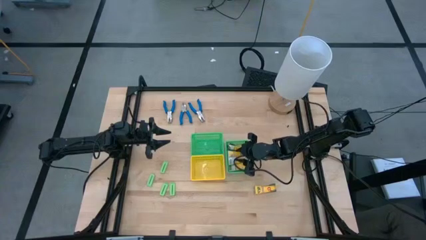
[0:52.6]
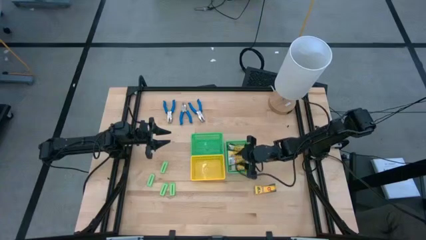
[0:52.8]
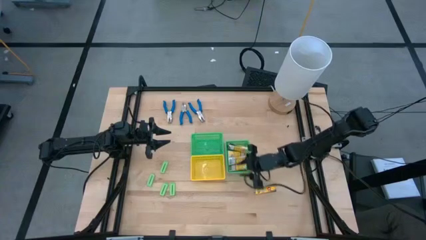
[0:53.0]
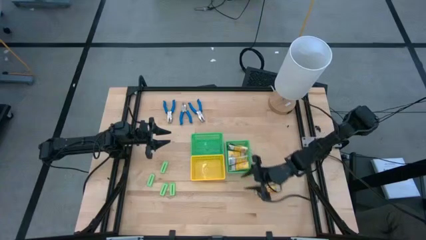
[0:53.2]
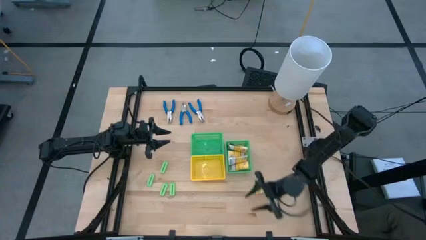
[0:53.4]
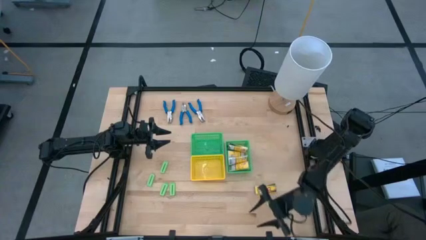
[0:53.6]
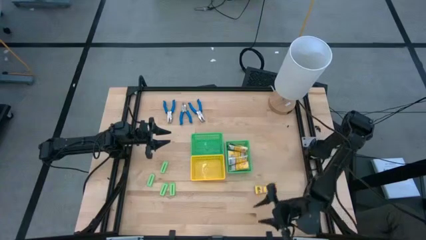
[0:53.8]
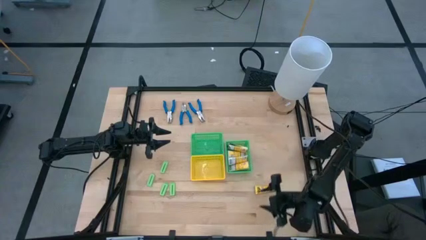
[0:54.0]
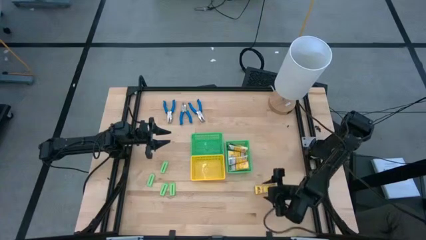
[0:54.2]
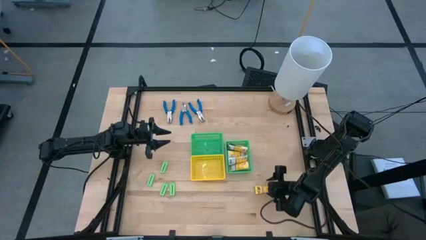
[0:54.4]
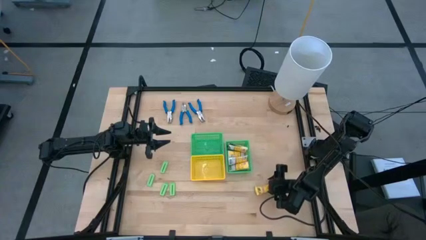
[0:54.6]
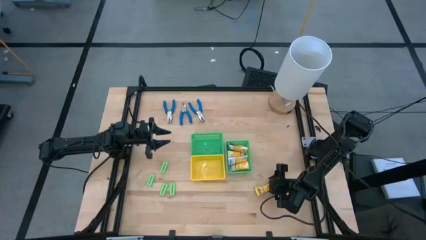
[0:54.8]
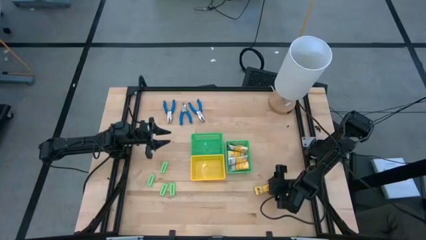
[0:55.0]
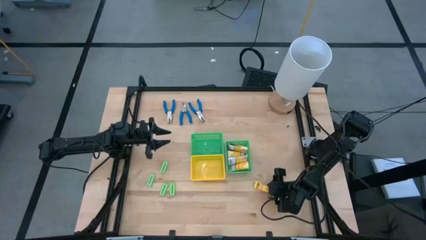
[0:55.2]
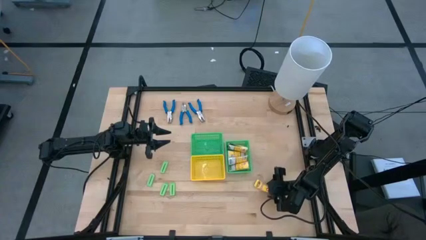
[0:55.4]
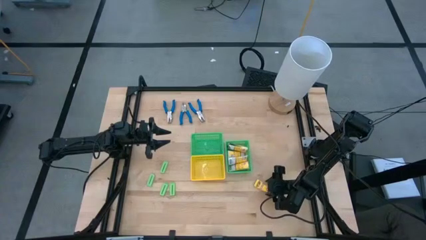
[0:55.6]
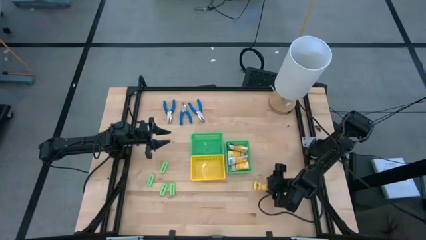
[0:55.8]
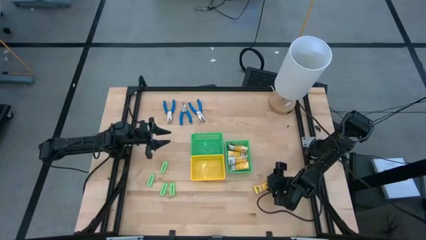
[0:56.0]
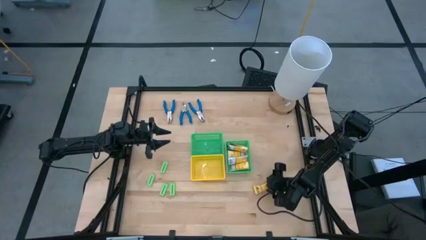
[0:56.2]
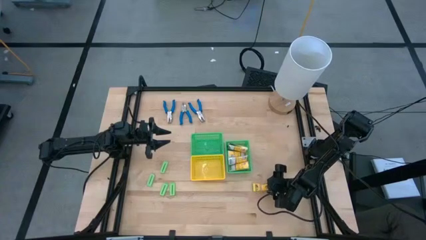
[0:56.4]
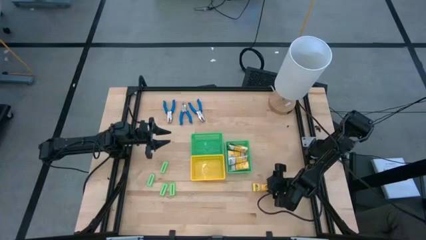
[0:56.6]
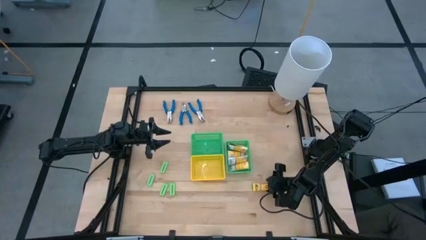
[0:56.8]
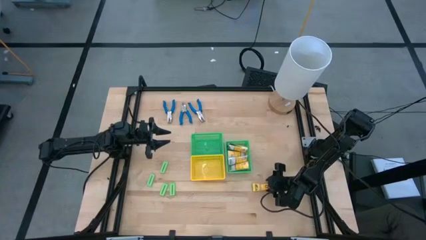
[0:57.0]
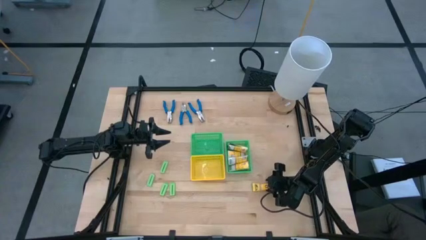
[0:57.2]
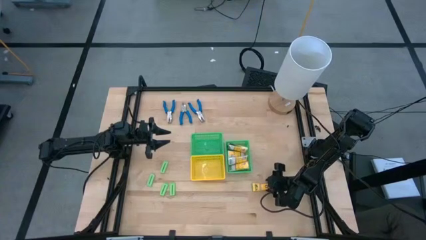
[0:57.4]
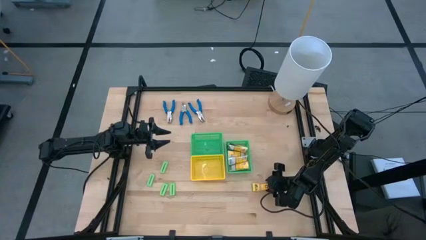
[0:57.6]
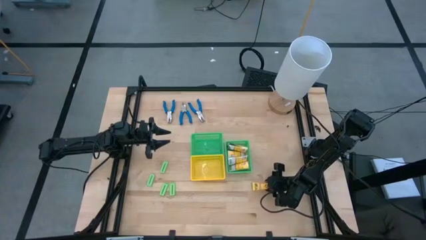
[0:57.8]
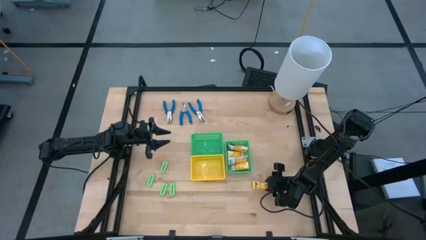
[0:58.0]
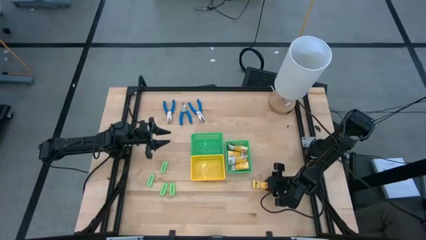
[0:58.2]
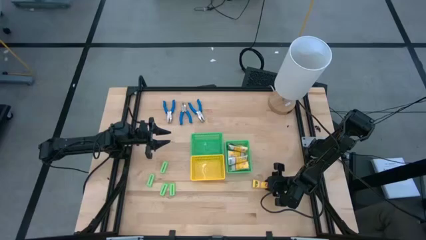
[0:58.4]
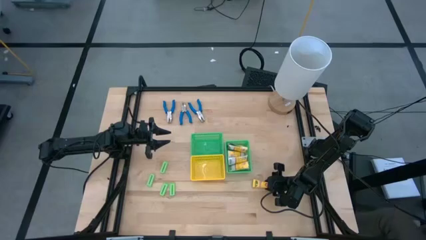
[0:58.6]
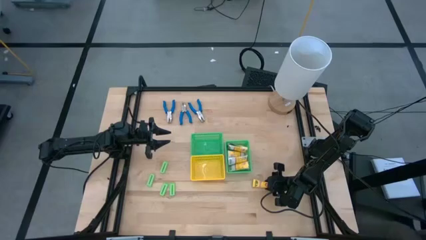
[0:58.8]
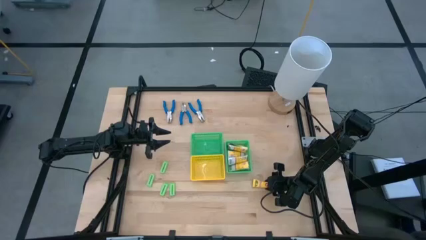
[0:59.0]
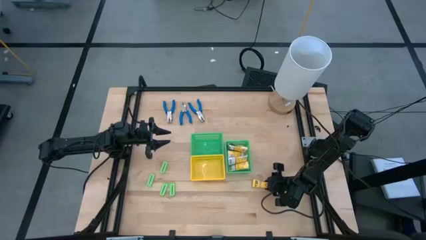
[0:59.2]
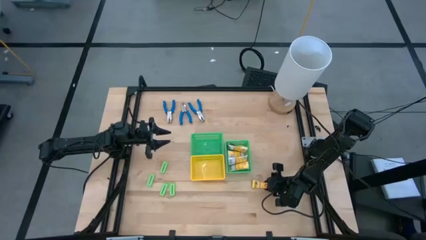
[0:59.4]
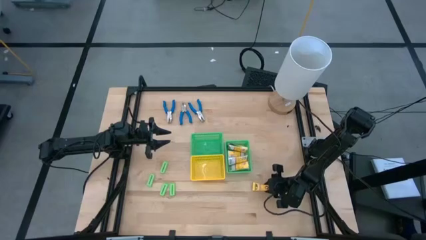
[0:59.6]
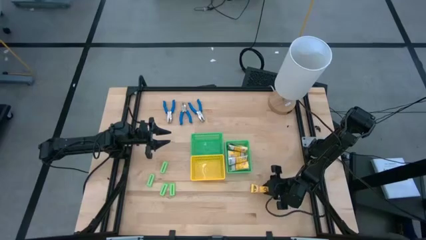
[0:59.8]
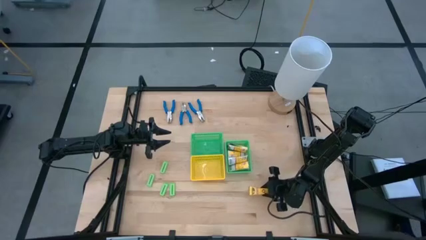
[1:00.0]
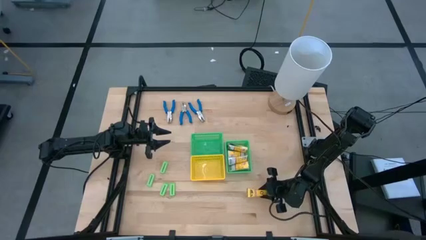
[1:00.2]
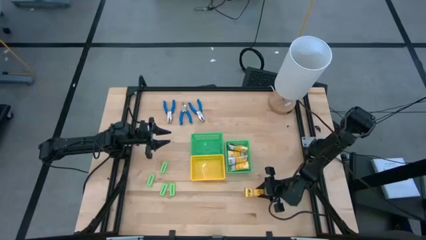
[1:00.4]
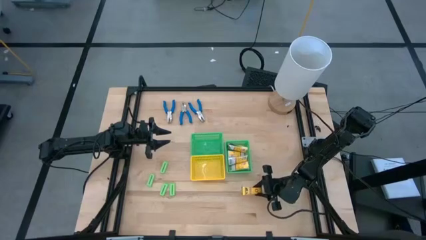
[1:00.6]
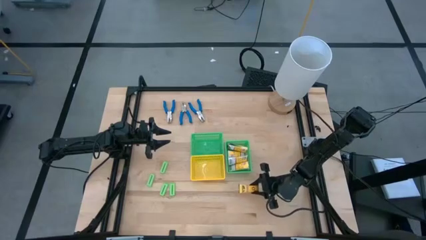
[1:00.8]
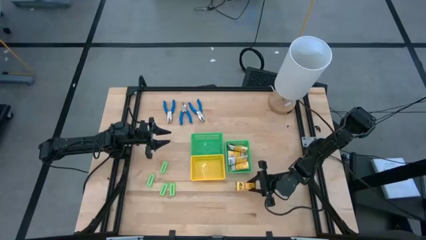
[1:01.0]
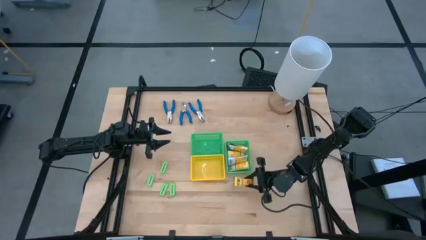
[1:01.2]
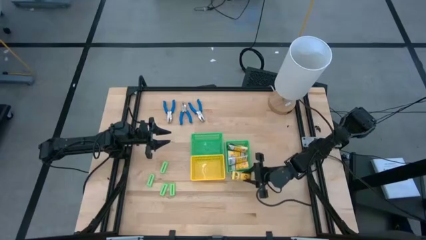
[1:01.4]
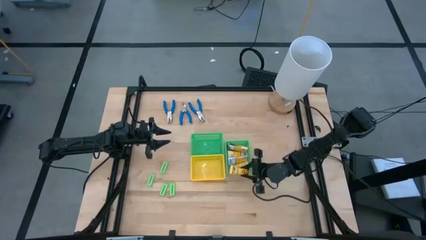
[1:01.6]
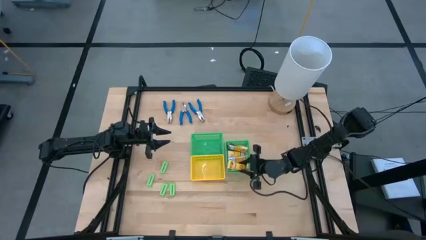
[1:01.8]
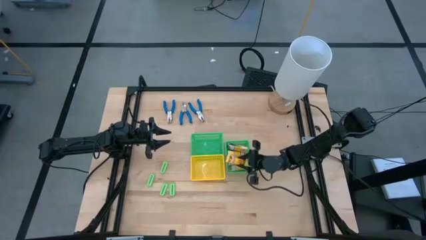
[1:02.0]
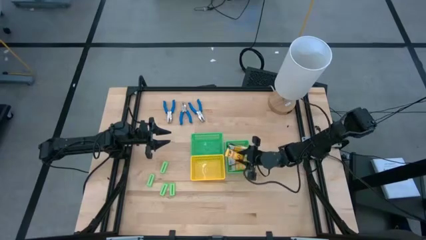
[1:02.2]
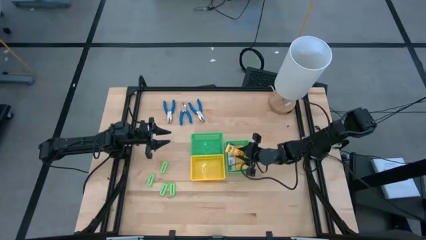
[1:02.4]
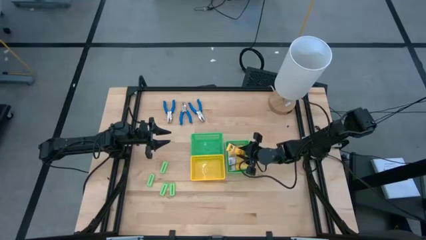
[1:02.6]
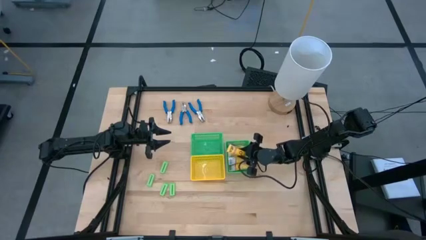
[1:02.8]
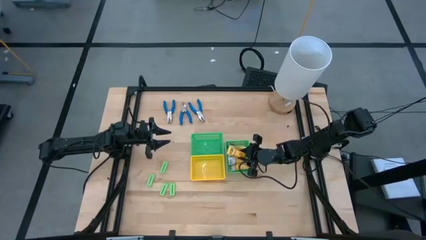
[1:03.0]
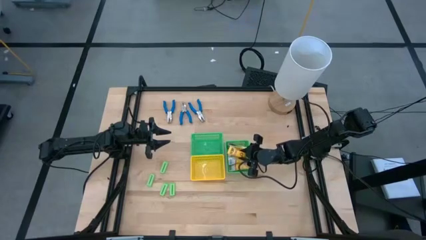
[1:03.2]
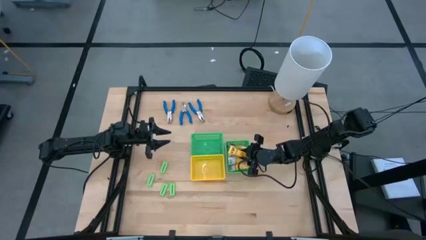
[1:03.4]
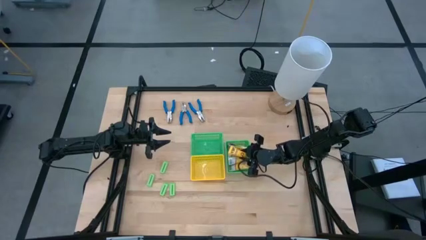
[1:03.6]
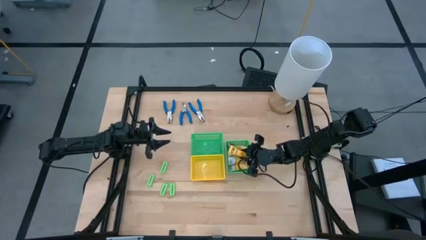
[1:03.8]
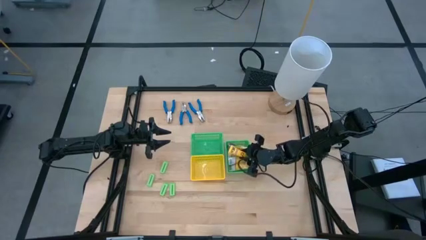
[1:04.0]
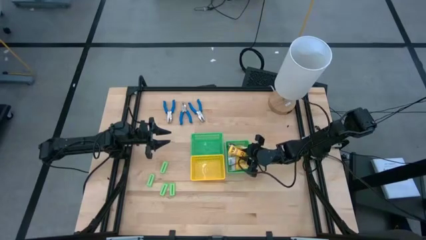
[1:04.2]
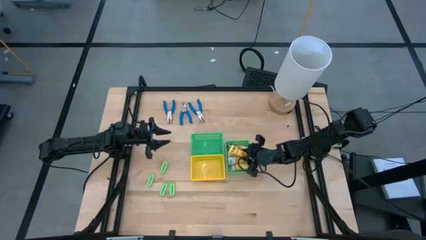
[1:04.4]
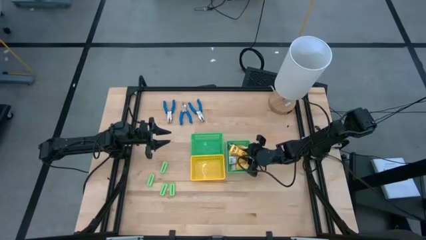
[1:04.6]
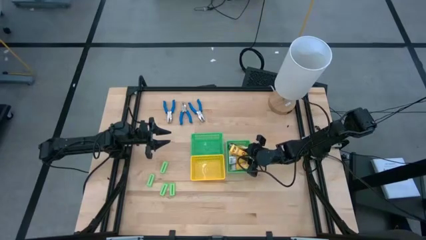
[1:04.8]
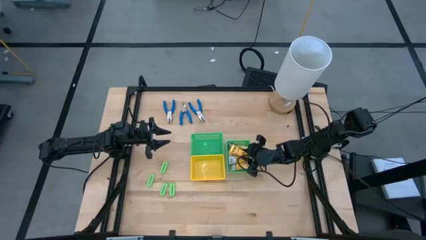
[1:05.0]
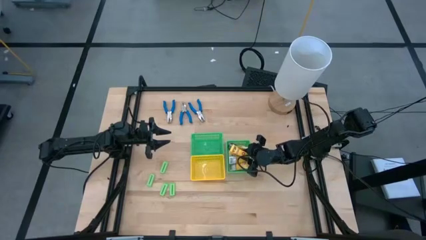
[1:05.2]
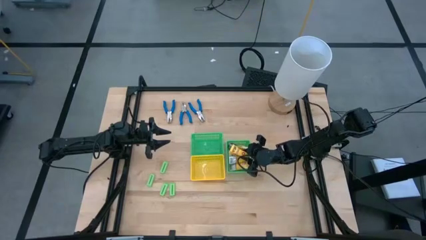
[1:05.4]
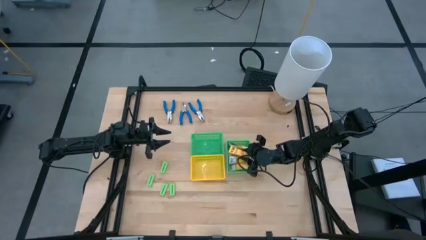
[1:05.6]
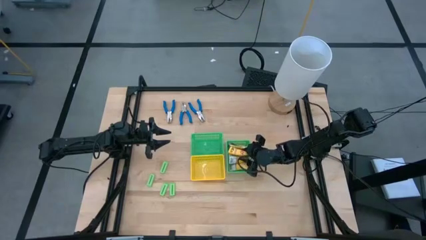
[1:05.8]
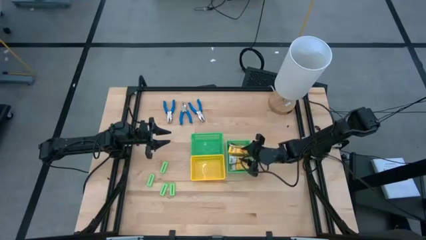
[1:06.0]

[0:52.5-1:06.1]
Task: Pick & Place School Supplies
Put the yellow crayon box into the right green bin
